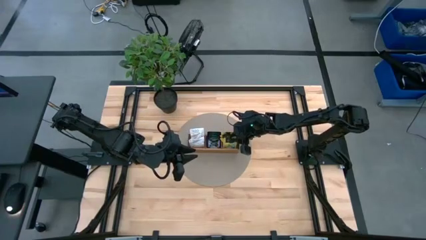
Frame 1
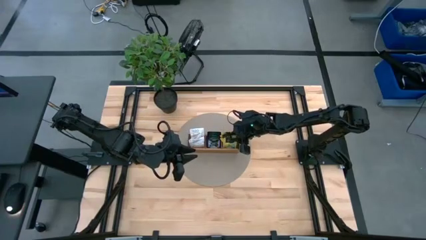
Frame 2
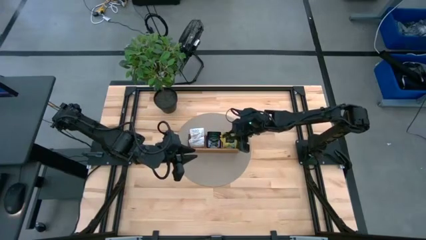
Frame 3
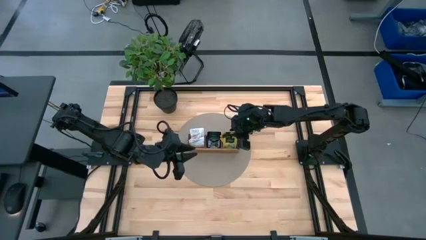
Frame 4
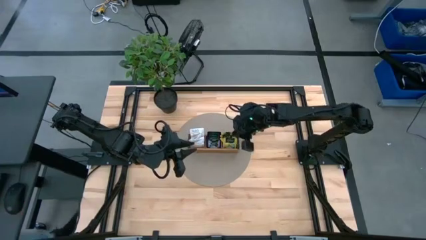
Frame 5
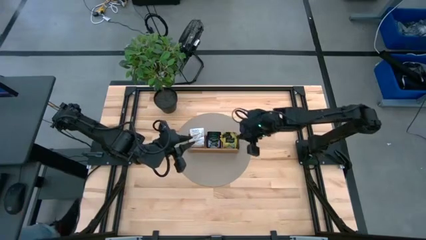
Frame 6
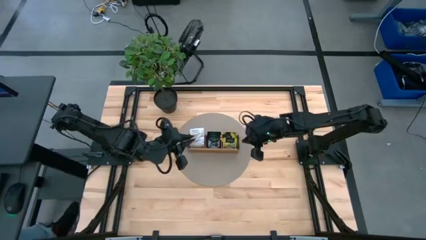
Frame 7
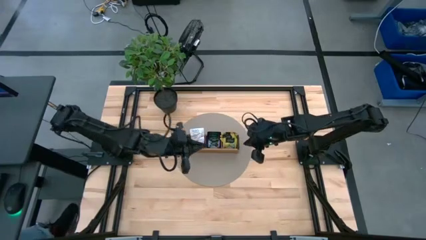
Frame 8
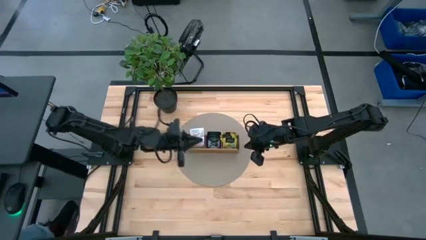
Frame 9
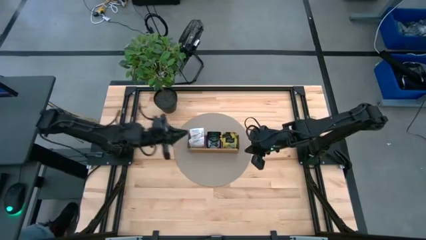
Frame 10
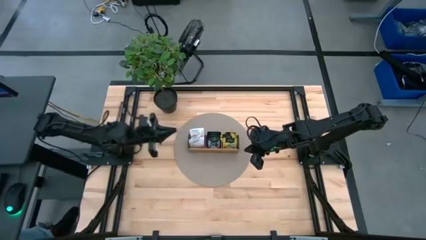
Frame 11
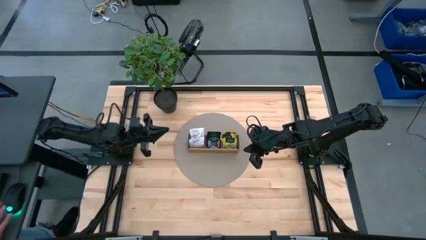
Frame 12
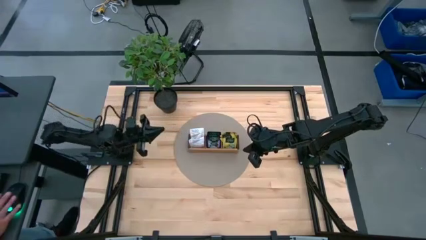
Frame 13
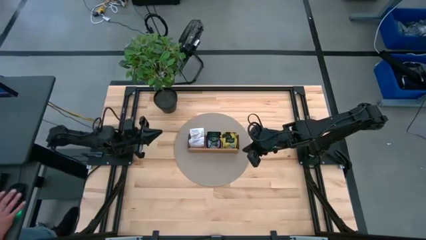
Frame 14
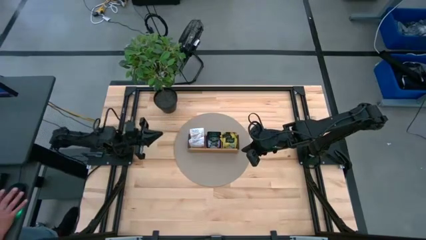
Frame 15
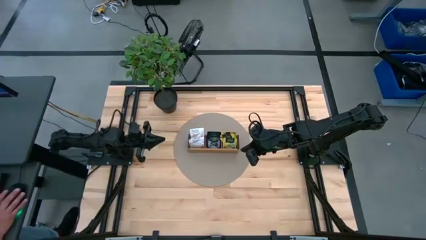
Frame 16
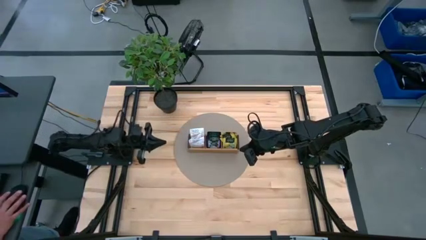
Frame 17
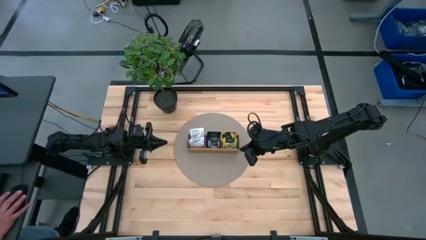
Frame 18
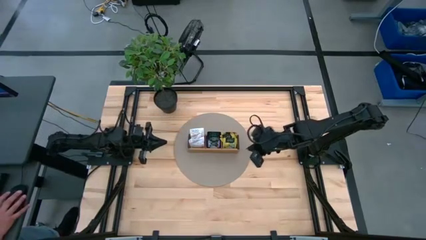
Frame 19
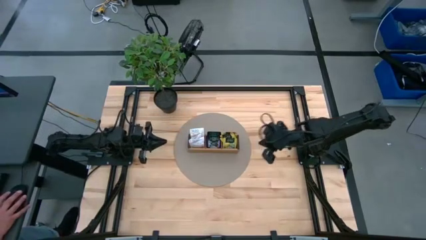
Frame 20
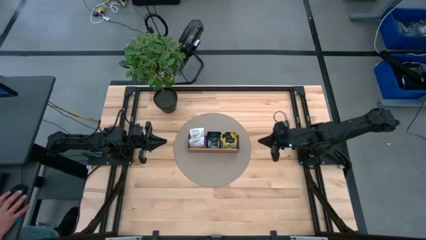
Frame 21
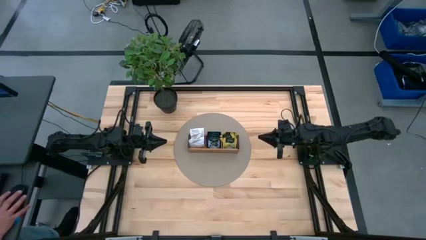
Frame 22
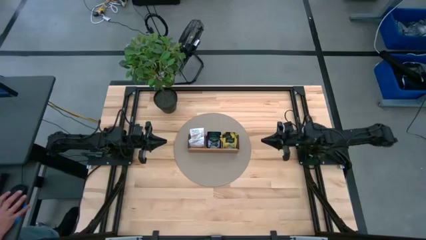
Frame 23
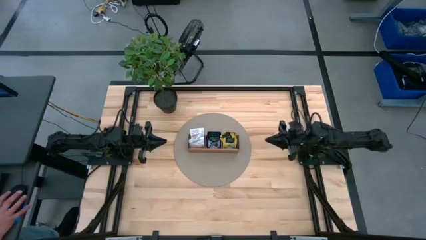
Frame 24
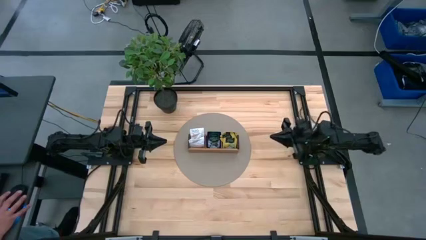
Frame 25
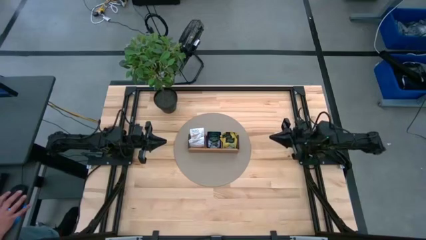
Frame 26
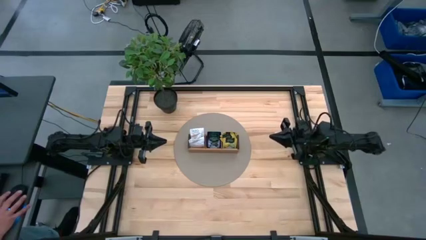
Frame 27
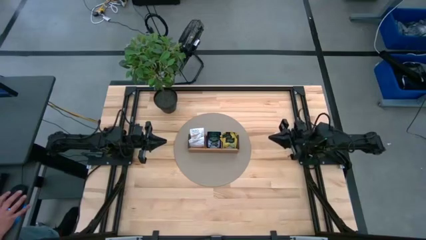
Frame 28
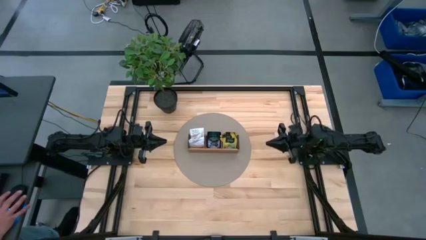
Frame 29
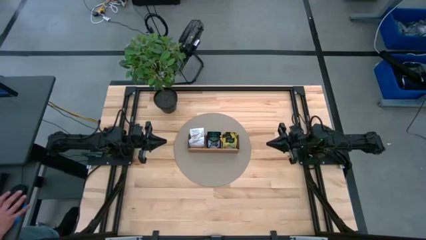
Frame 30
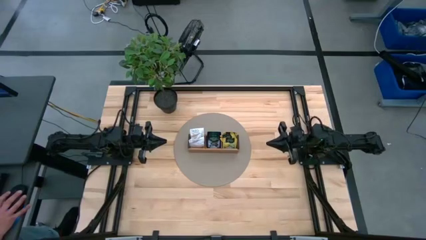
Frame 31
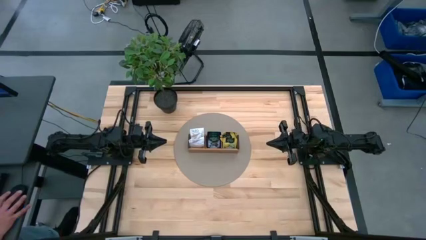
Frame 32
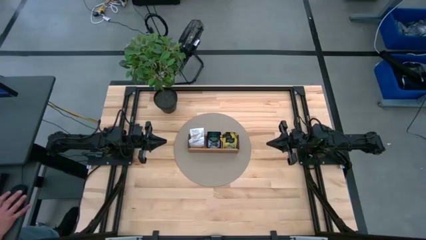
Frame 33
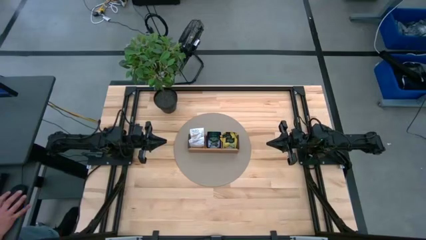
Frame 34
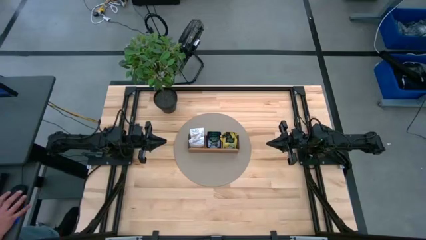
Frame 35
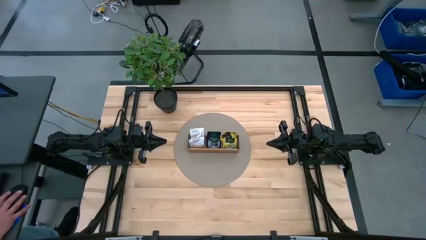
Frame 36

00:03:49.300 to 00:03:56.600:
Task: Pick & Place Tea
Return to Home Position

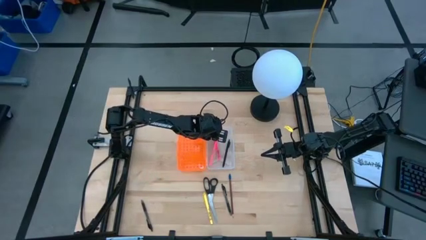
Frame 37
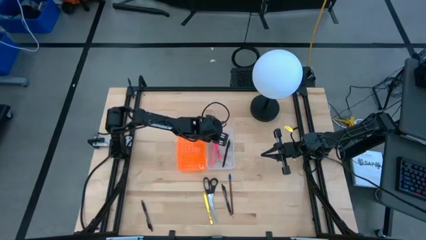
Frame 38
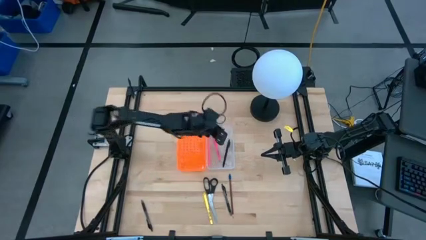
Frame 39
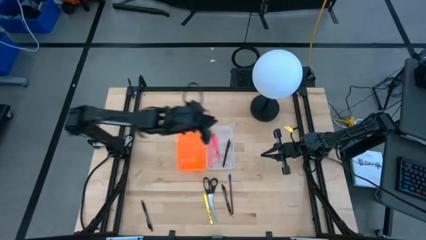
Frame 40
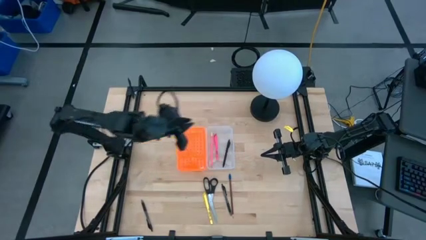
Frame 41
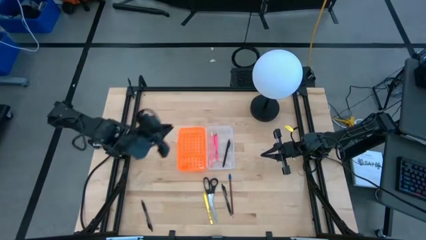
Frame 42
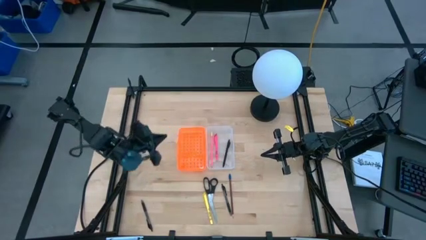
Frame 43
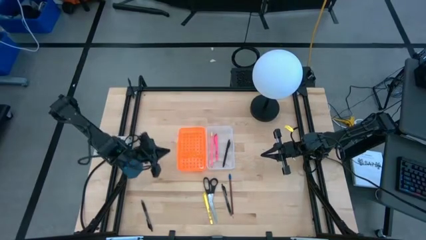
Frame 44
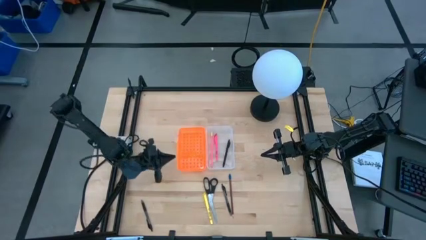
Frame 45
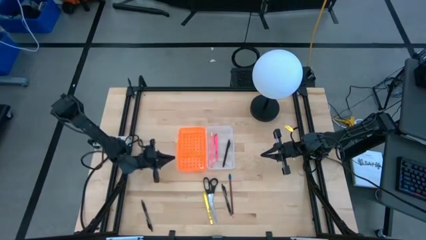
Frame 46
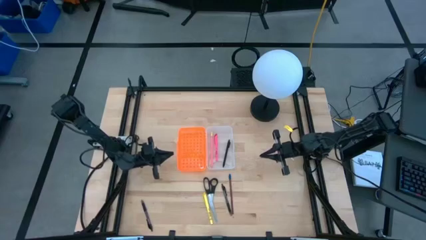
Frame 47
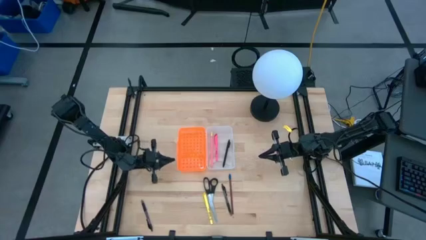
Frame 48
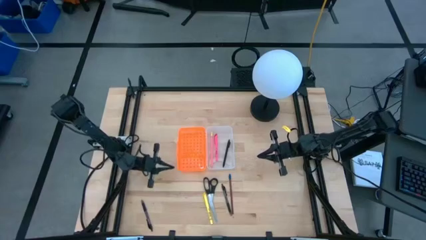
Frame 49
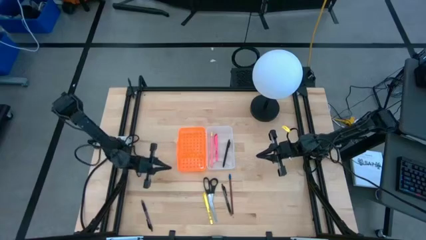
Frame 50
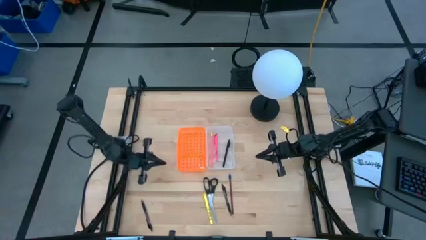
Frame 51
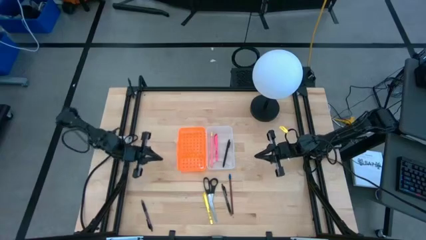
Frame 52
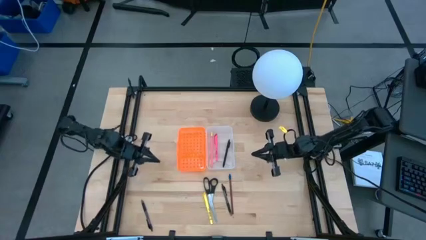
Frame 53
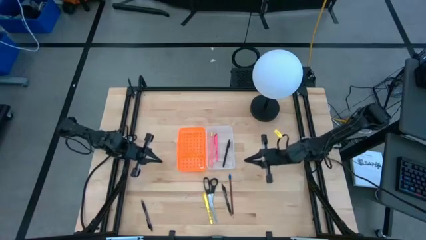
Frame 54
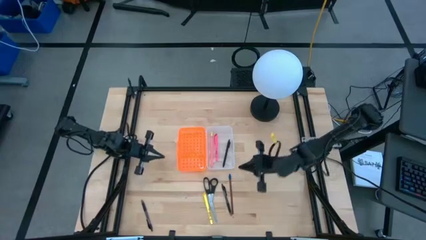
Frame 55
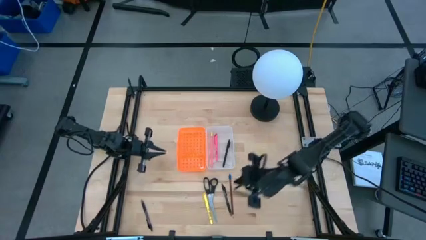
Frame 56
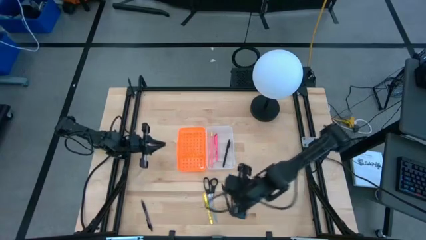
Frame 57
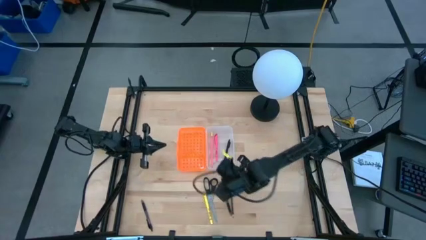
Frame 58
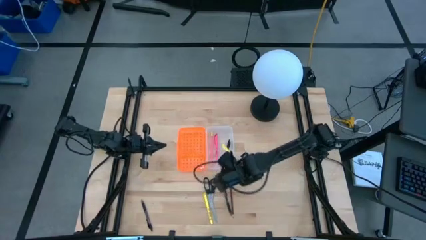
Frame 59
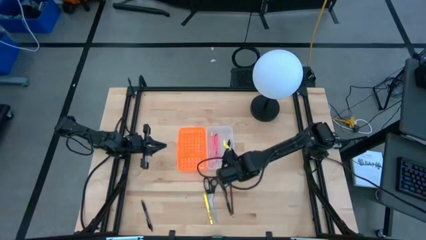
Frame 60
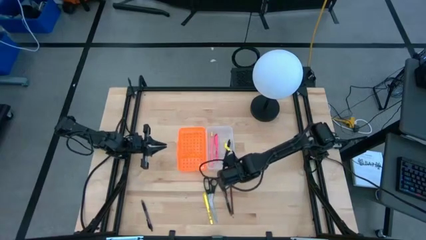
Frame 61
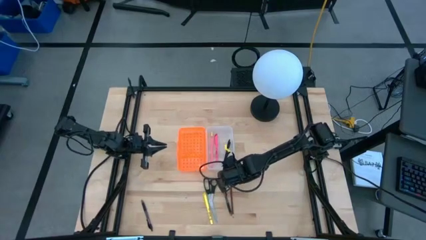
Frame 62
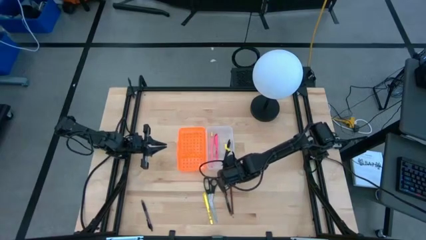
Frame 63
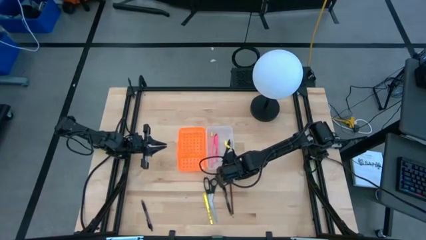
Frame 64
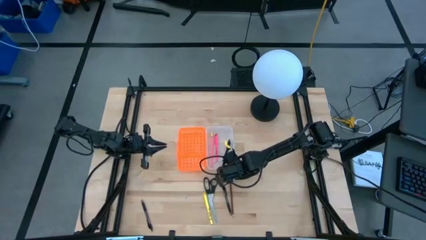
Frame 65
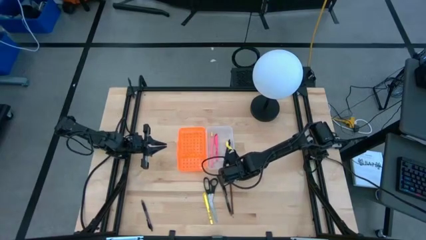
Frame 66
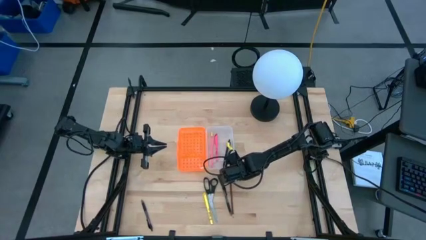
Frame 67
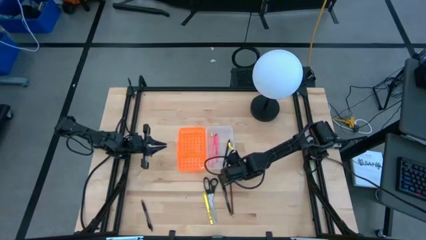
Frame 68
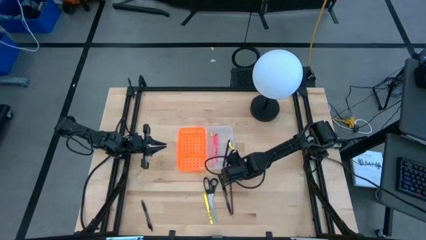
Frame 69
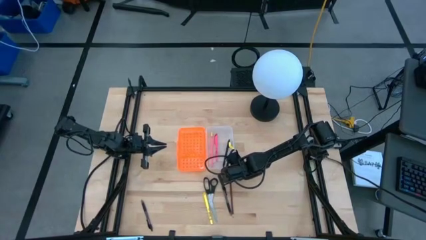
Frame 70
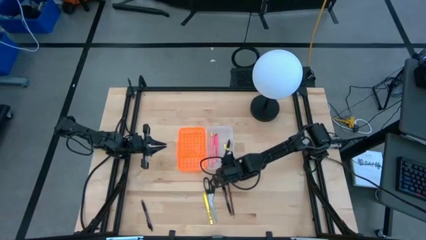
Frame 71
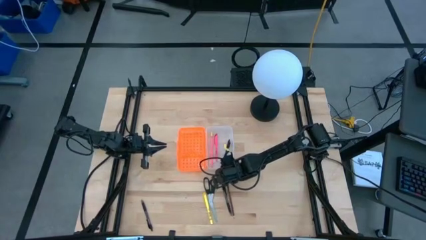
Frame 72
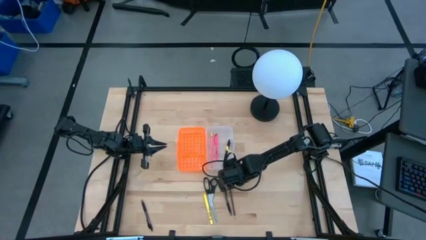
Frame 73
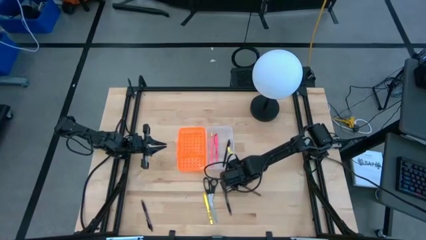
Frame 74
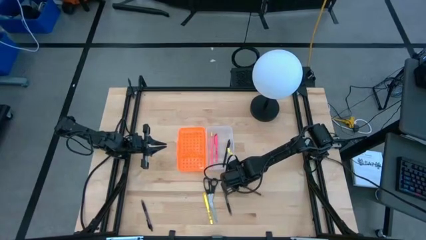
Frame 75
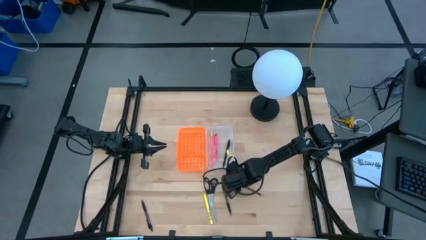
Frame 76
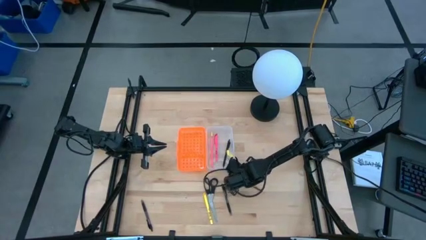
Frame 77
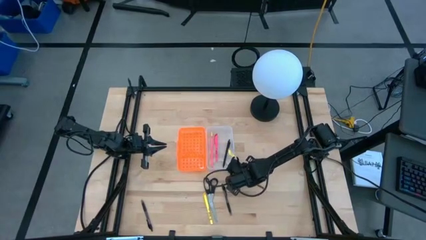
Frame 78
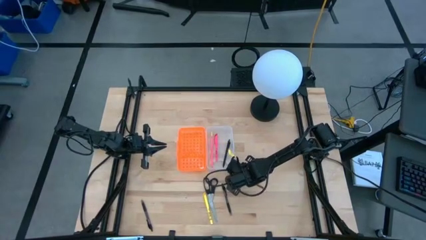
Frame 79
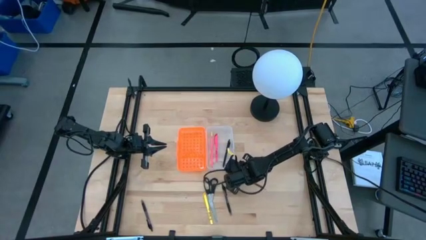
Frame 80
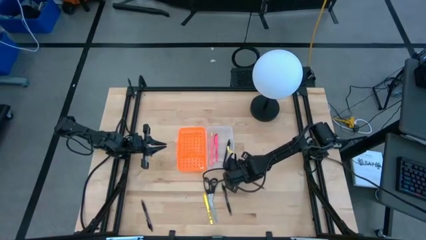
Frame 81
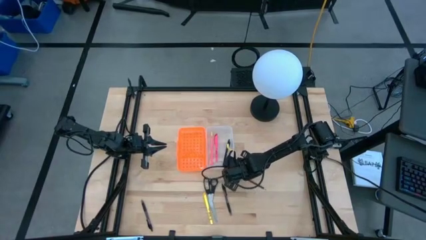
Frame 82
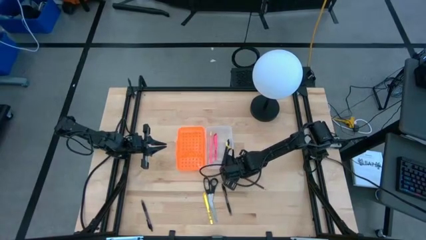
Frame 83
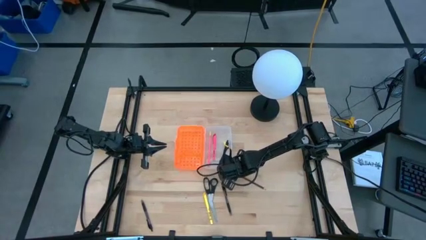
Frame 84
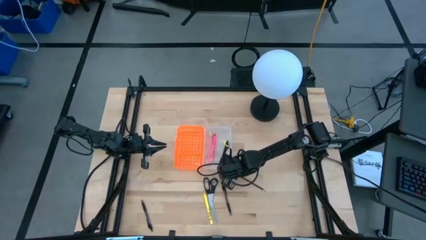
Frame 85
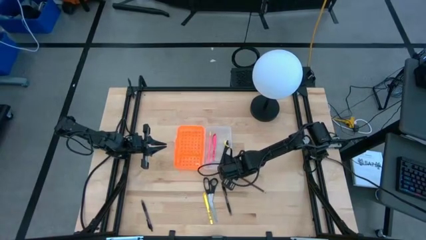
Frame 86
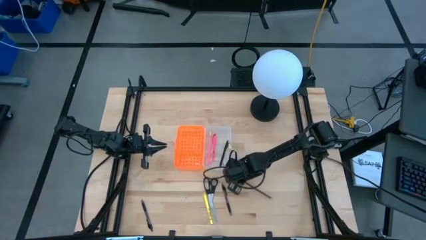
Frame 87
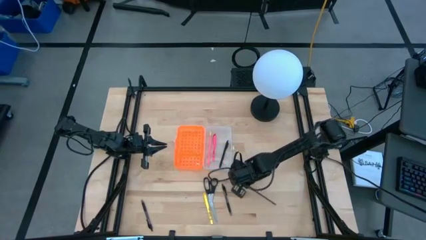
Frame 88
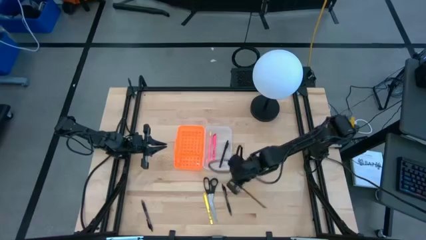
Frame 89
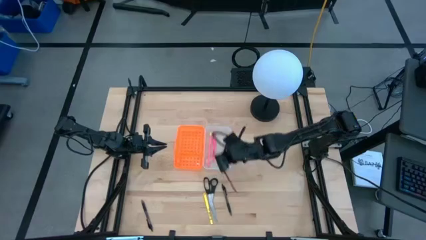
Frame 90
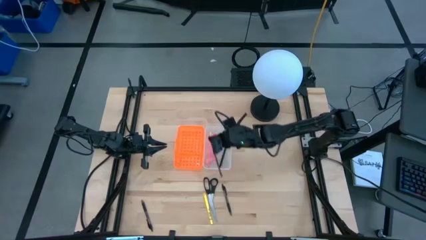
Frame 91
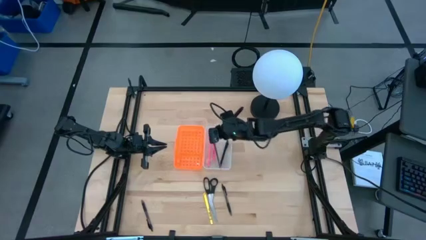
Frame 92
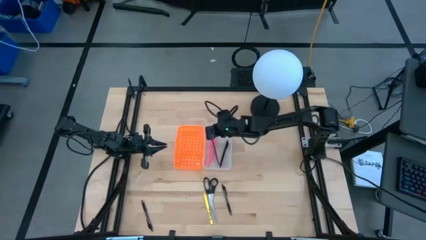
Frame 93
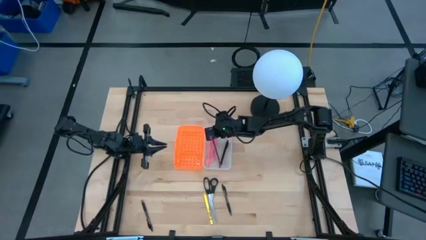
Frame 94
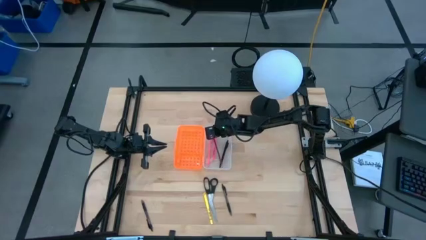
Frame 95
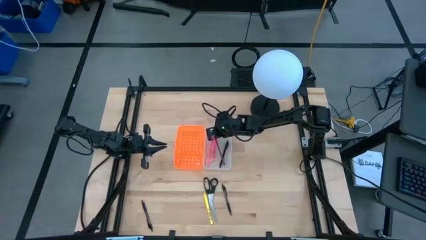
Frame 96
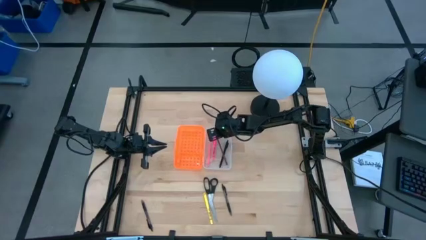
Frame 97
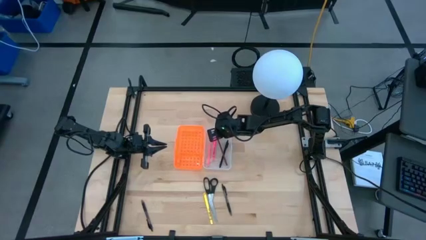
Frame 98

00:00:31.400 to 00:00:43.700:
Task: Pick & place school supplies into a supply box
Put the brown pencil into the supply box
